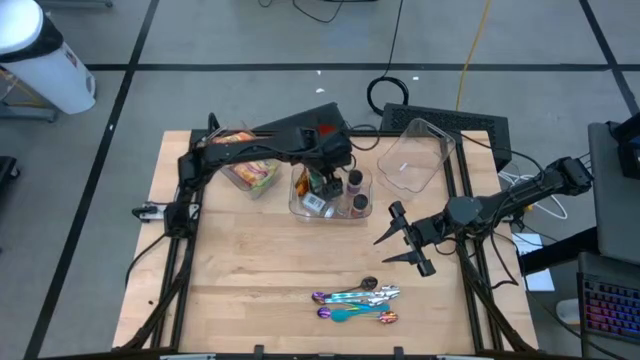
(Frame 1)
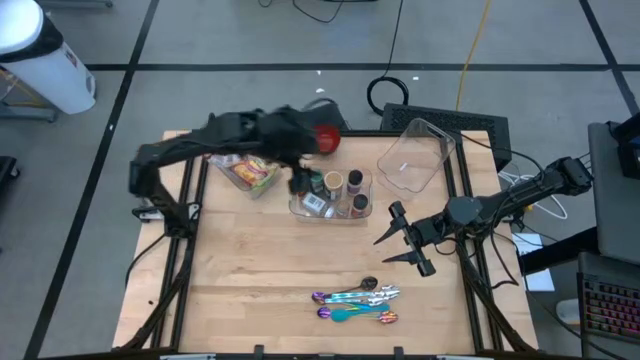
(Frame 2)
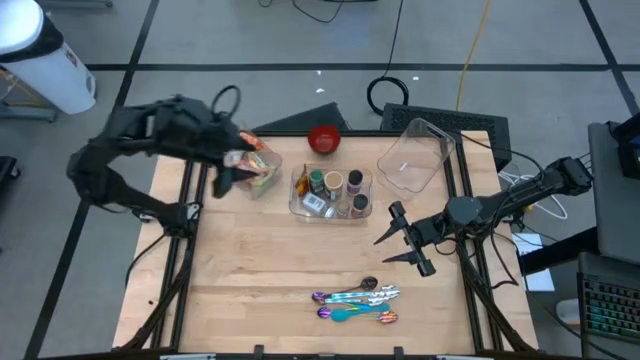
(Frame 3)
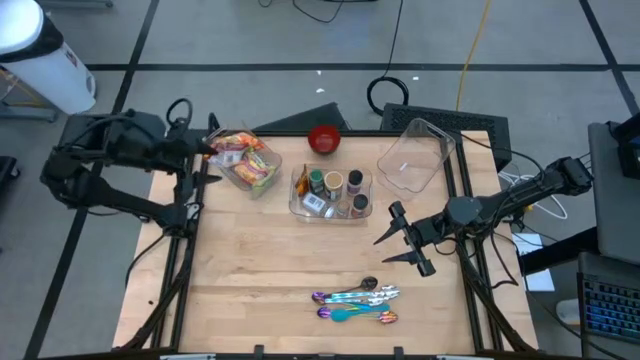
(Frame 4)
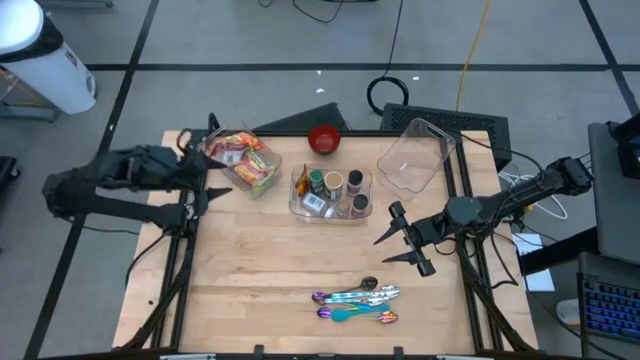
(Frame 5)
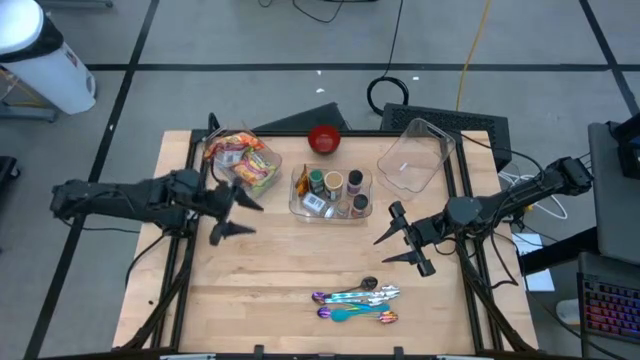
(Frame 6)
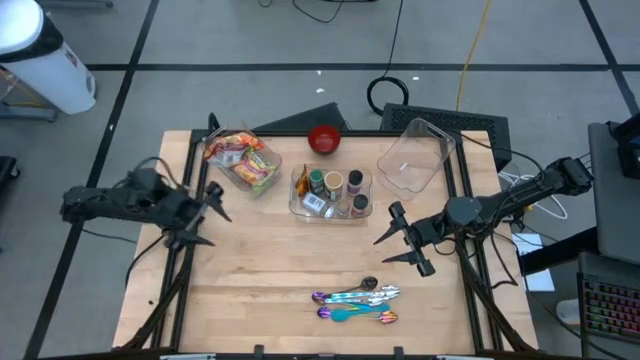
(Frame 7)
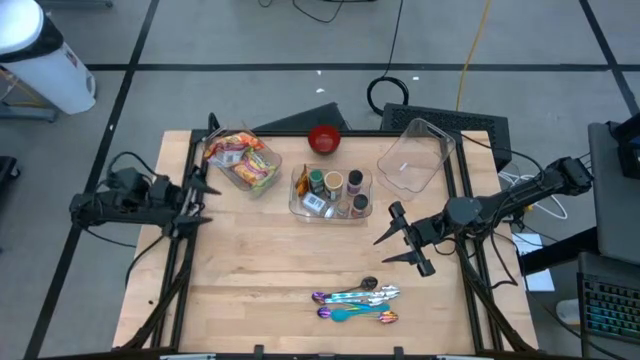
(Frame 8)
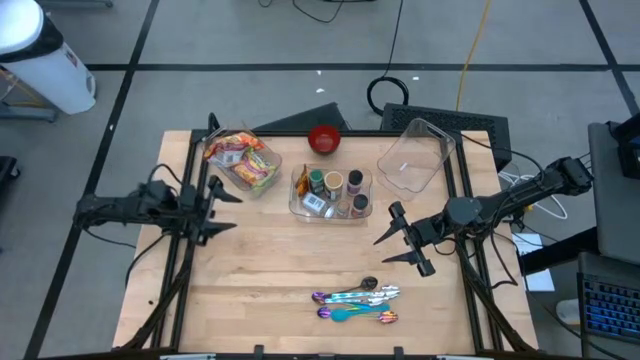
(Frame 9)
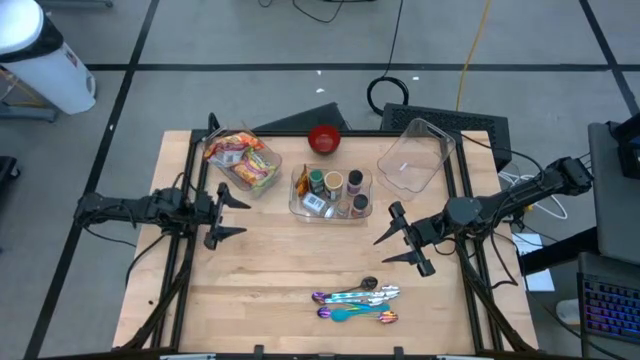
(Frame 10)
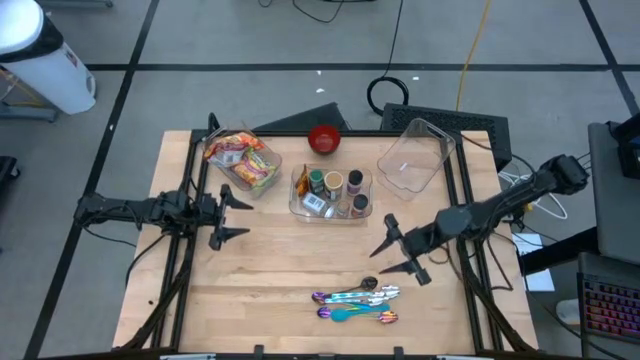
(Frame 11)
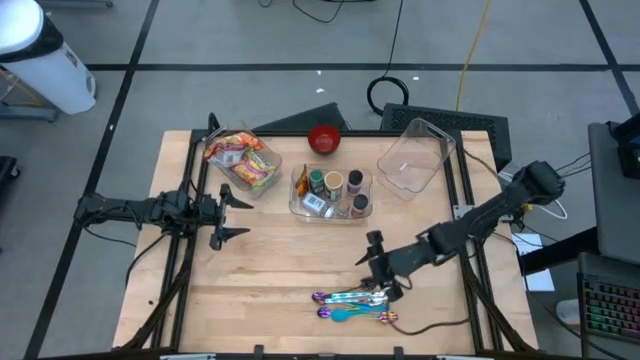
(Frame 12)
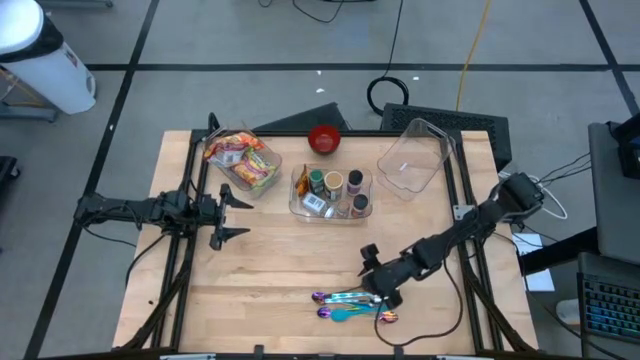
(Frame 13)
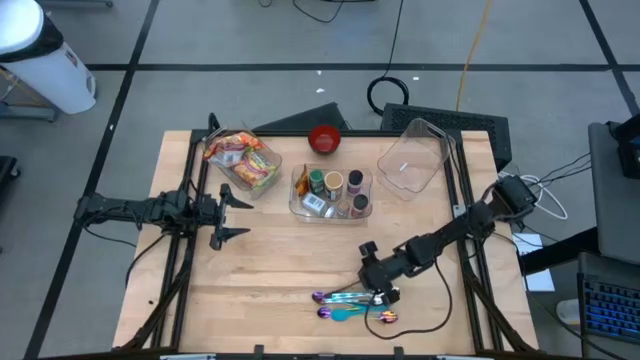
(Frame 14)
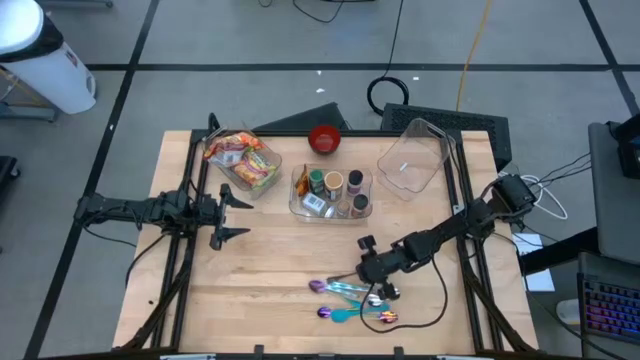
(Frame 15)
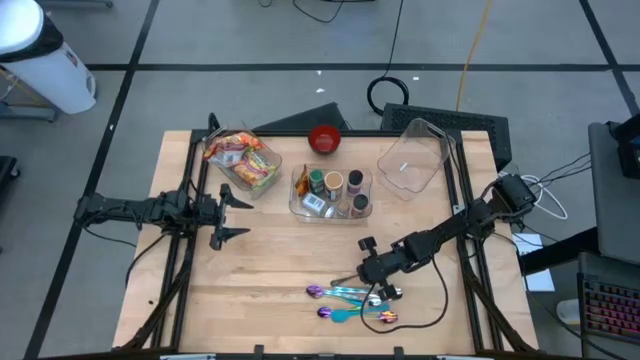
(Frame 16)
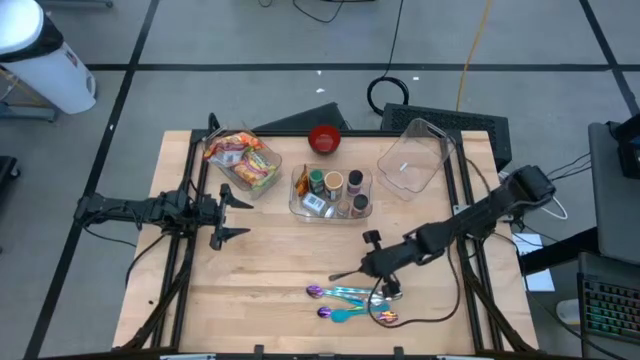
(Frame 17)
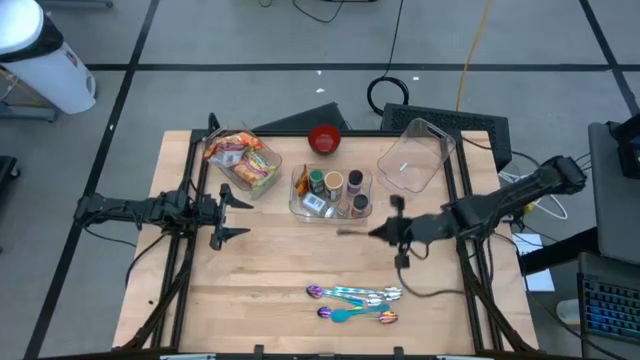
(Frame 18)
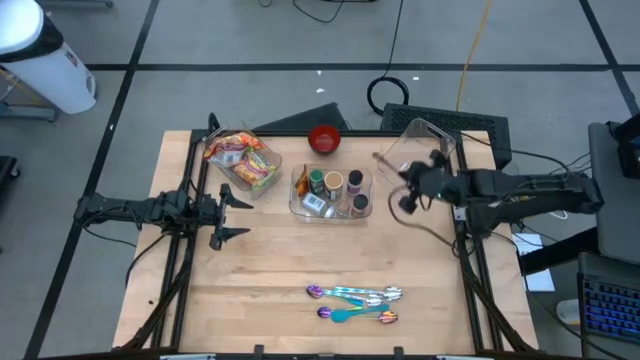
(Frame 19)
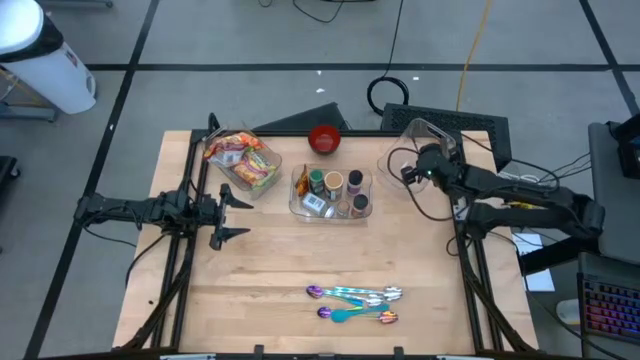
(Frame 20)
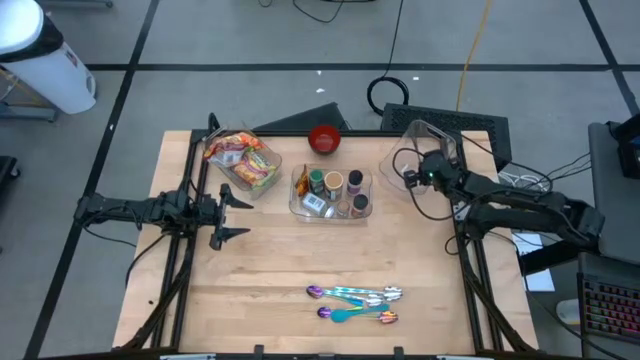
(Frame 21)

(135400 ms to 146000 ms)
Task: Pick & Place Food Item
Put the black spoon into the right transparent bin

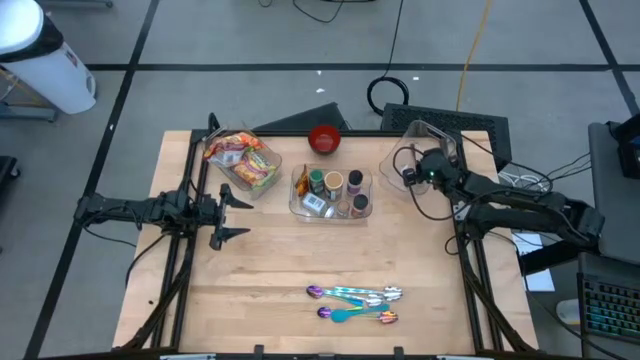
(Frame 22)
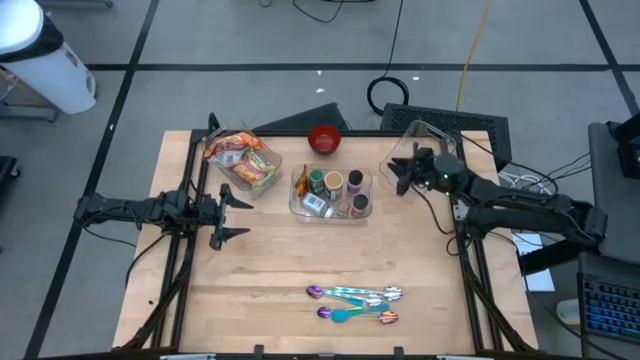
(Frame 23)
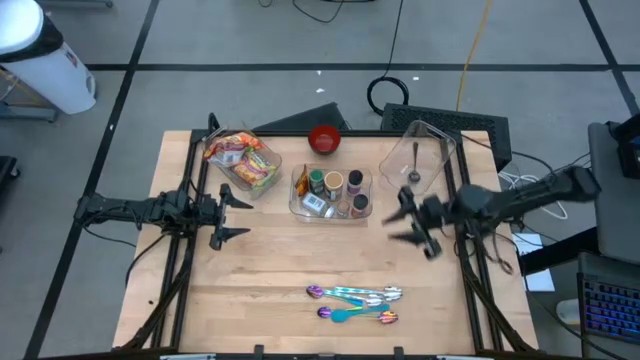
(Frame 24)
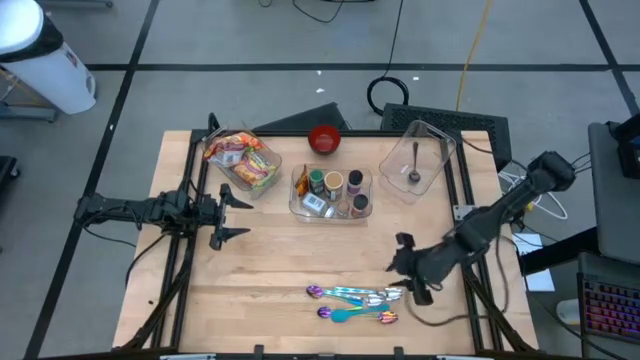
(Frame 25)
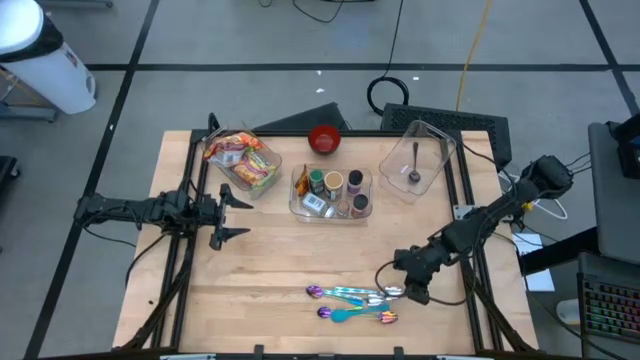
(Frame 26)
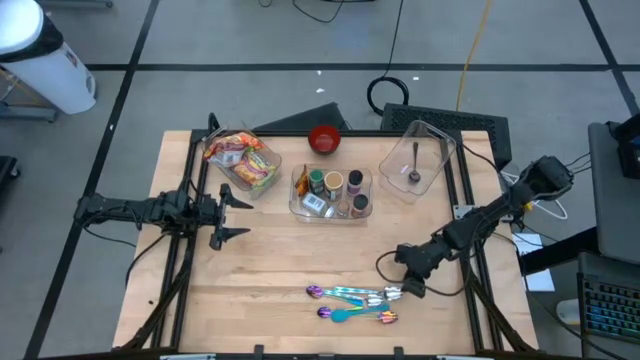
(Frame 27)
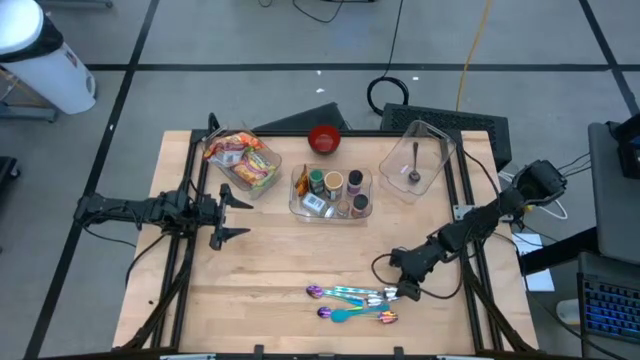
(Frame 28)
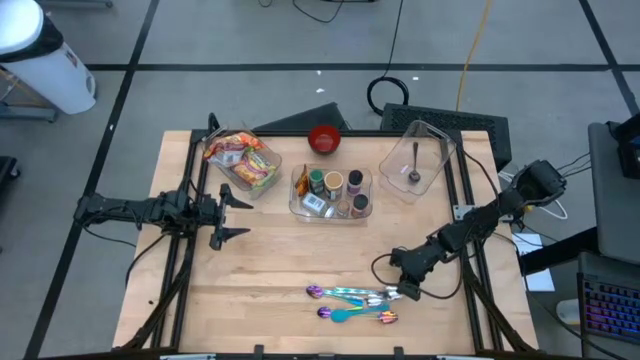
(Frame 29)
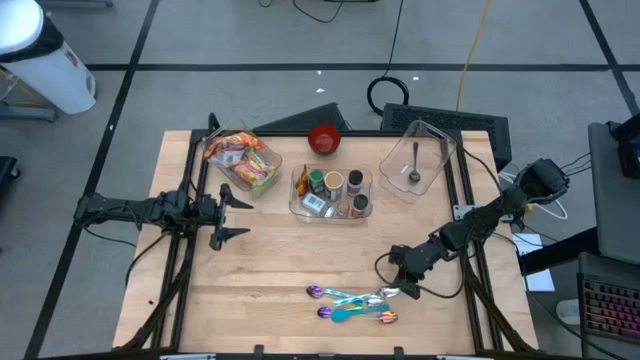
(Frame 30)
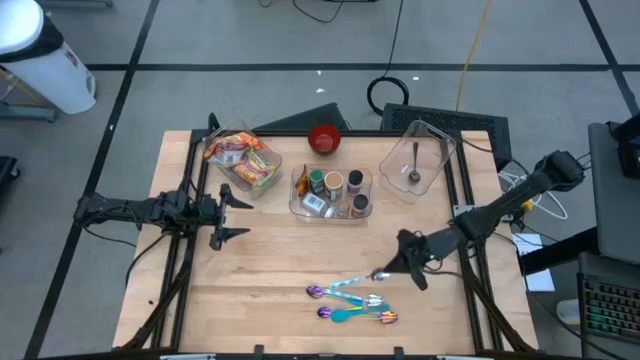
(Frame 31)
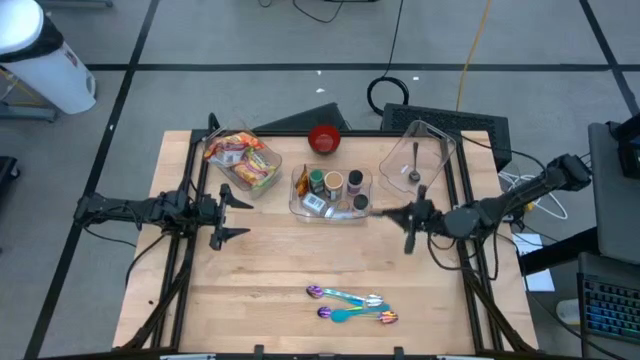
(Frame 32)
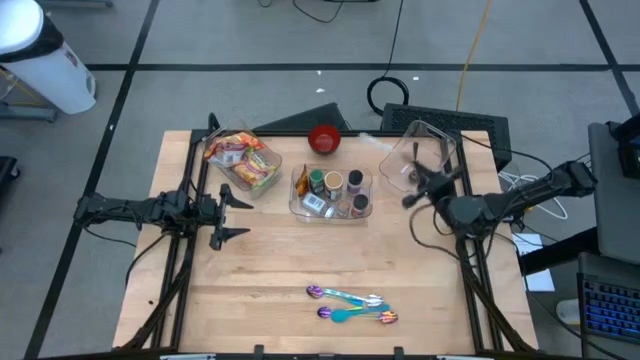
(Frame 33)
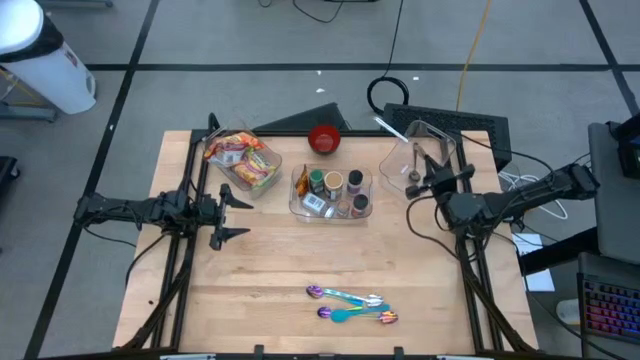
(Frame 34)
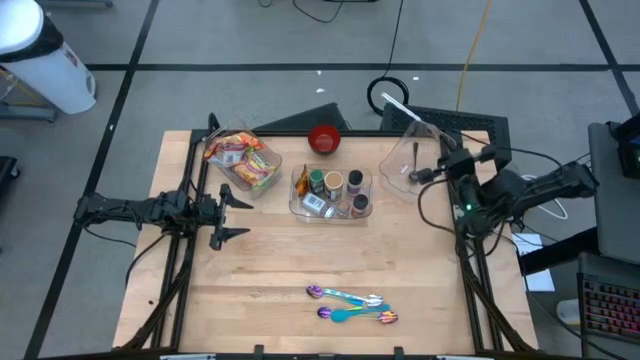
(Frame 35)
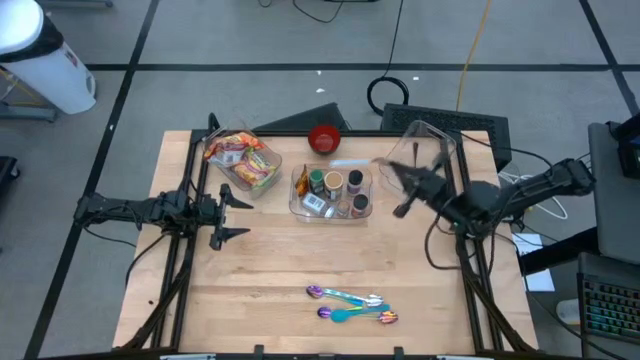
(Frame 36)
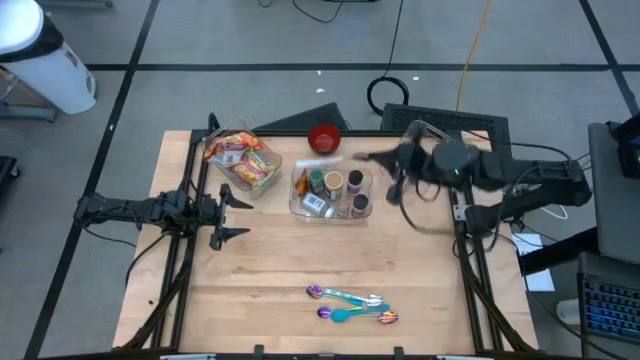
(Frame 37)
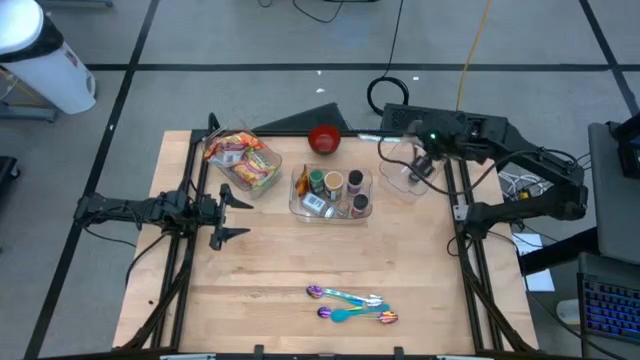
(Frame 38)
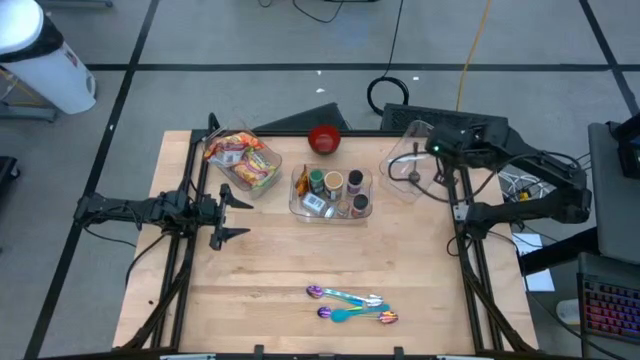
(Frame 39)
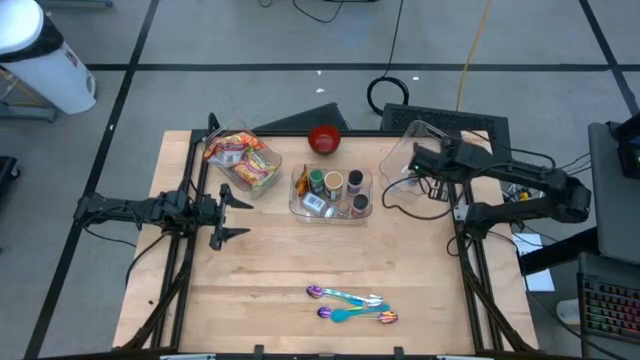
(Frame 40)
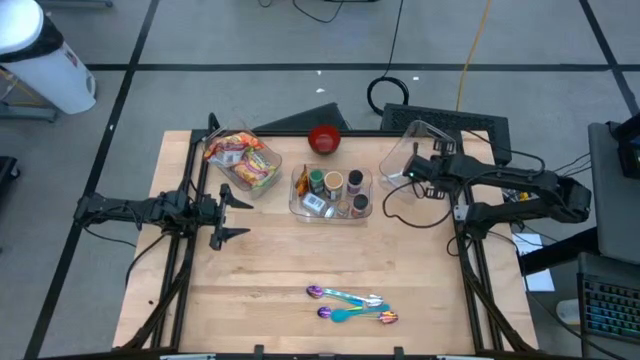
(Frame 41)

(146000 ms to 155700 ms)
Put the top silver spoon into the right transparent bin

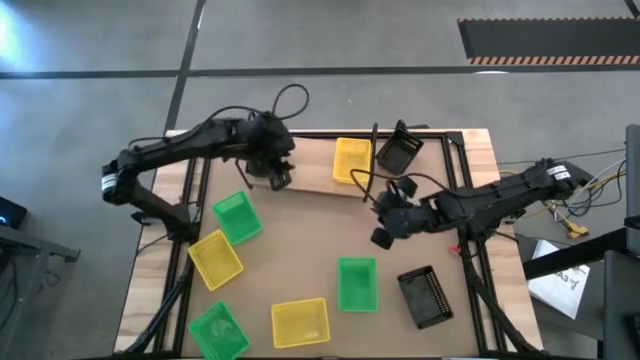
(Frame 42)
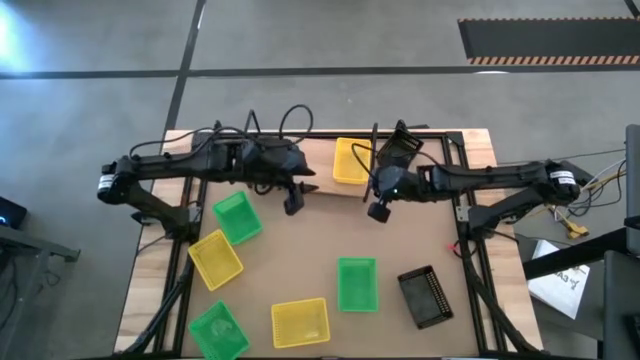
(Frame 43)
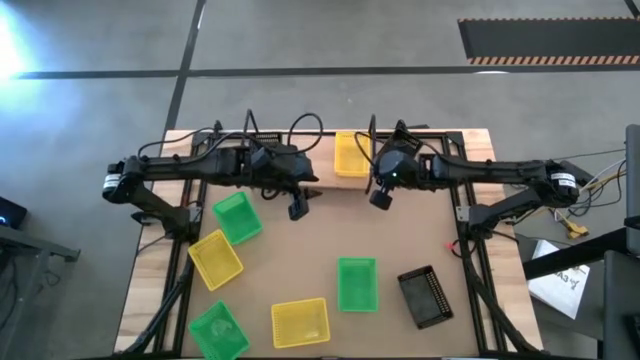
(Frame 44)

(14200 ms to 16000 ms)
Task: Stack baskets on shelf by color
Adjust the shelf
